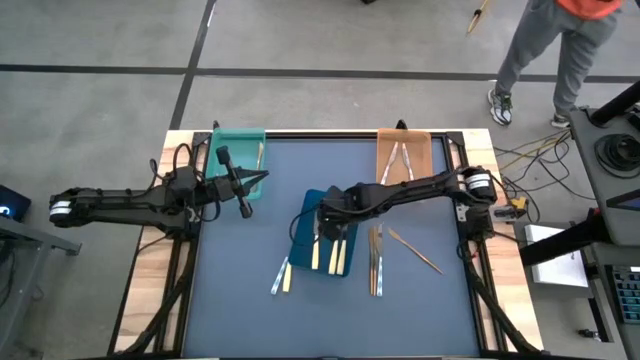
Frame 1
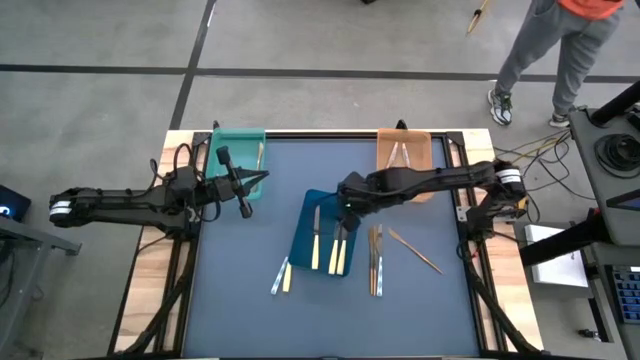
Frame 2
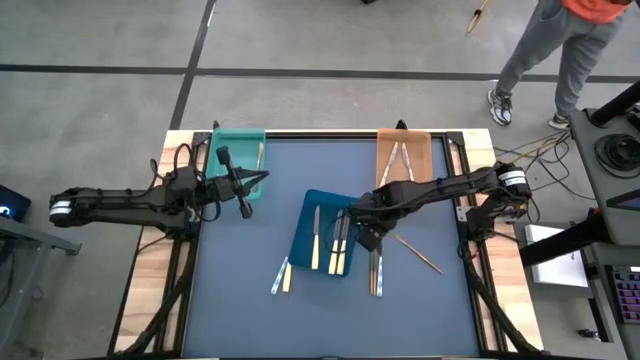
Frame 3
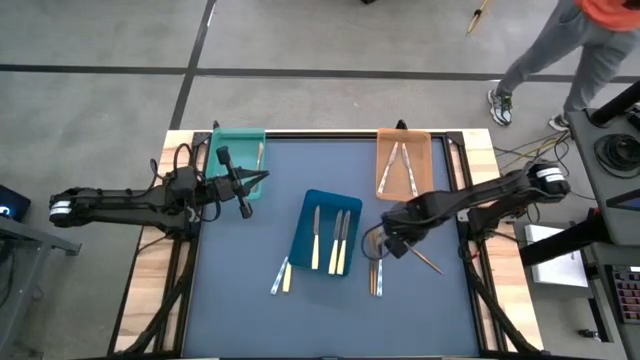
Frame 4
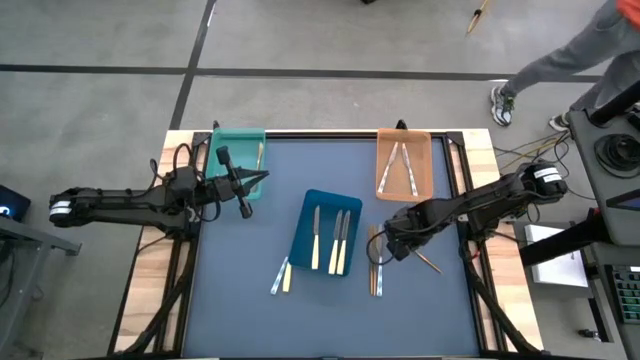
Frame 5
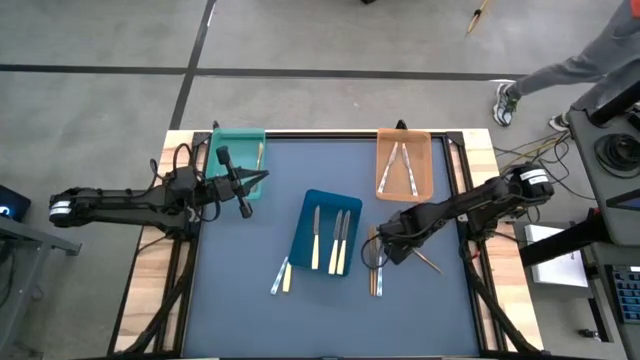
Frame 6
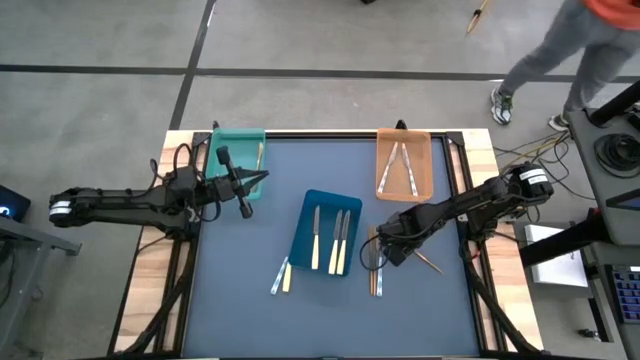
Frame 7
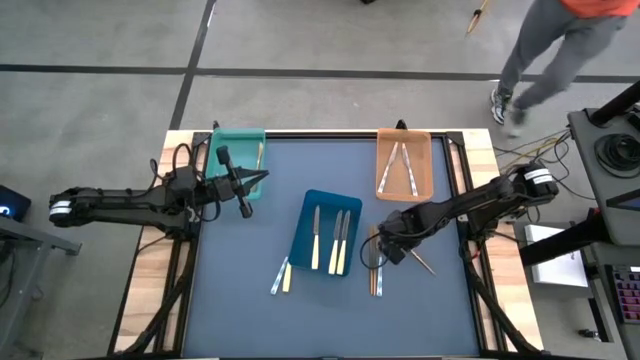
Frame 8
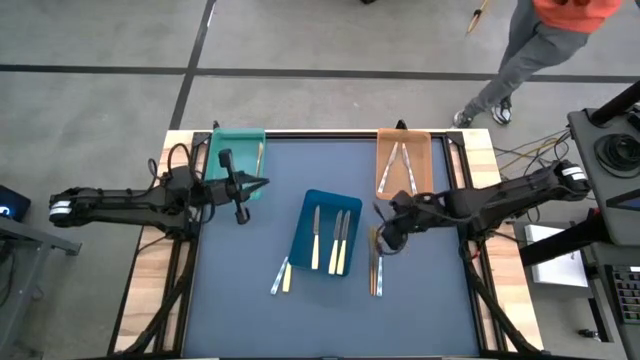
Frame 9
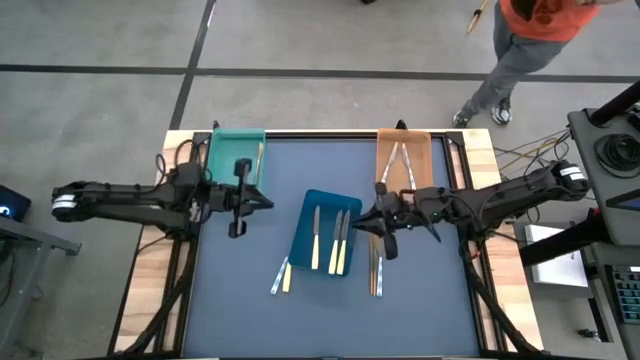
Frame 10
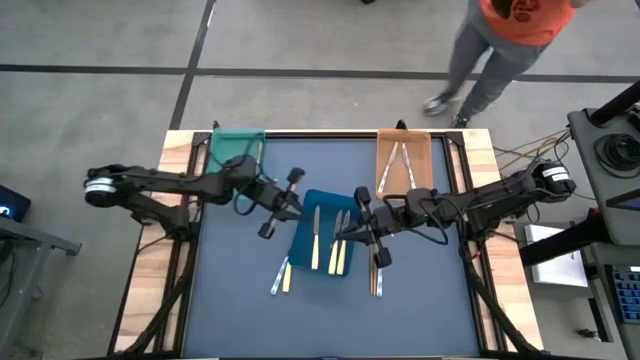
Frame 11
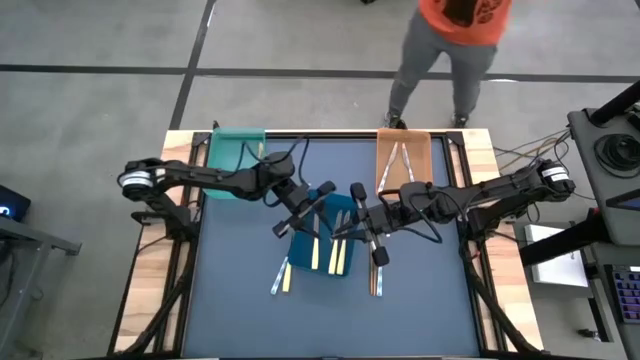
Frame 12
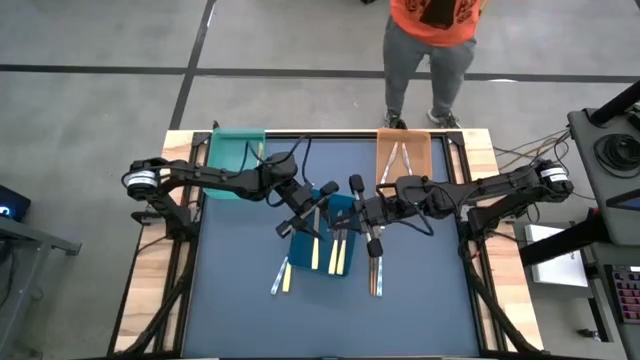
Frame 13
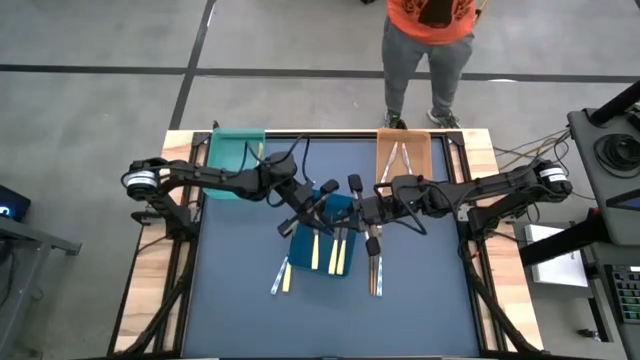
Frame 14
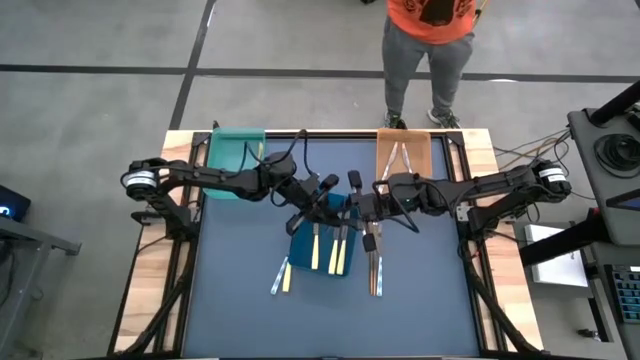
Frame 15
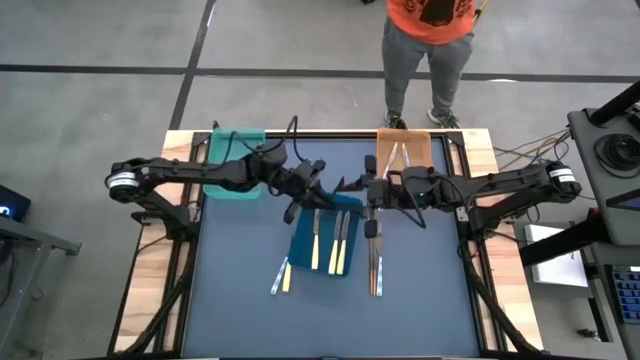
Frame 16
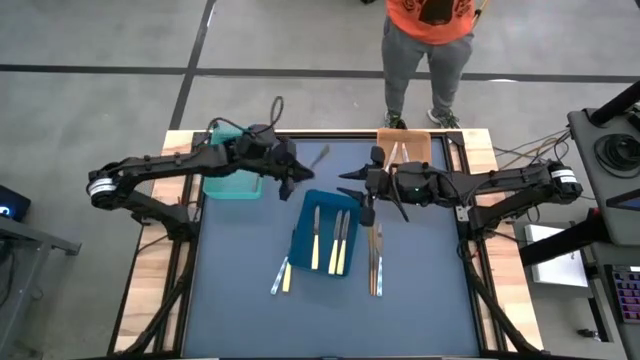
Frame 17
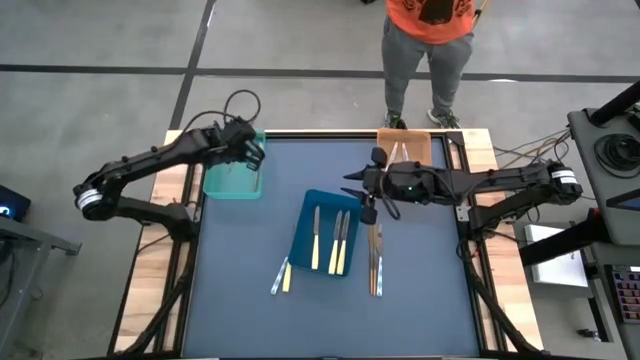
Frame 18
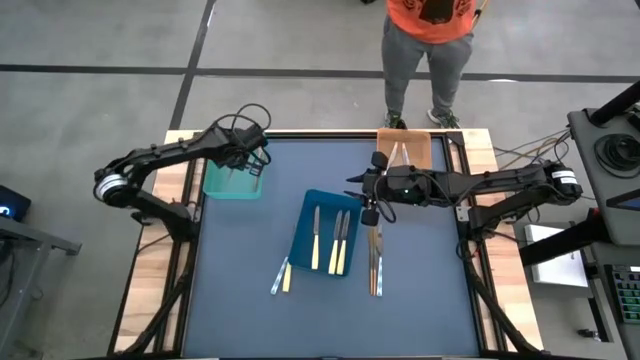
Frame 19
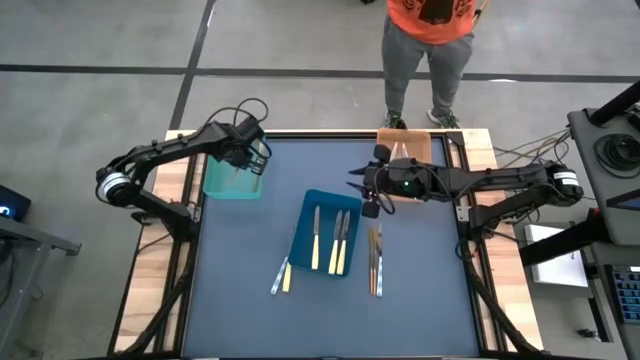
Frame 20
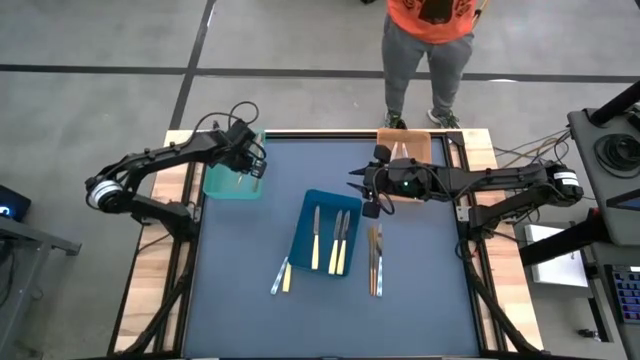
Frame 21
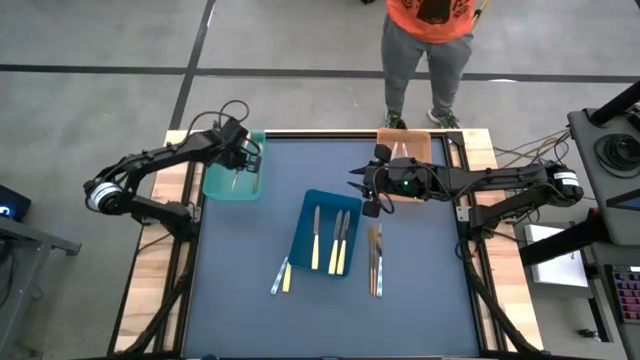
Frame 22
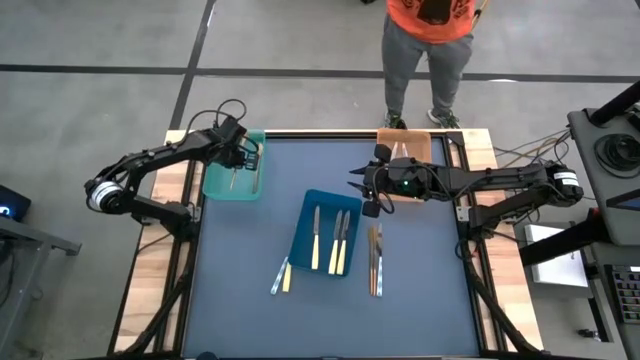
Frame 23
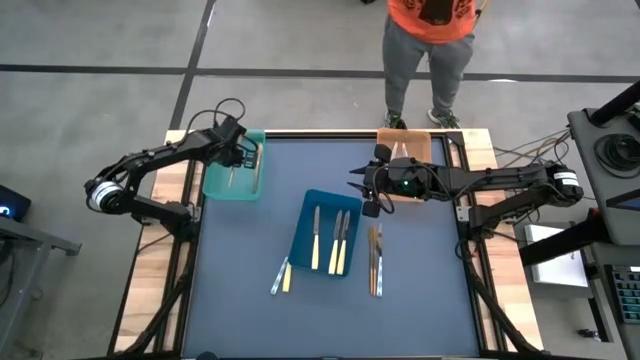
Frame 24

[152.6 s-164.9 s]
Task: Sort silverware by color (type)
Put the top right gold knife into the light blue bin

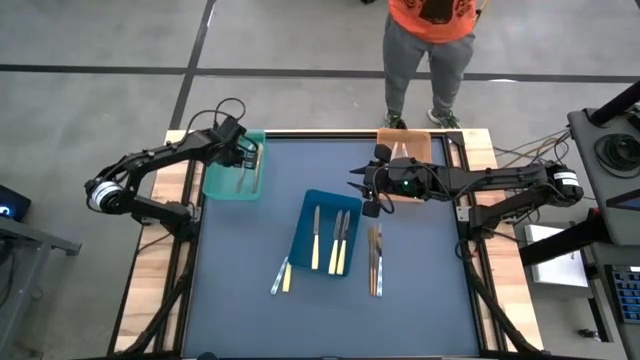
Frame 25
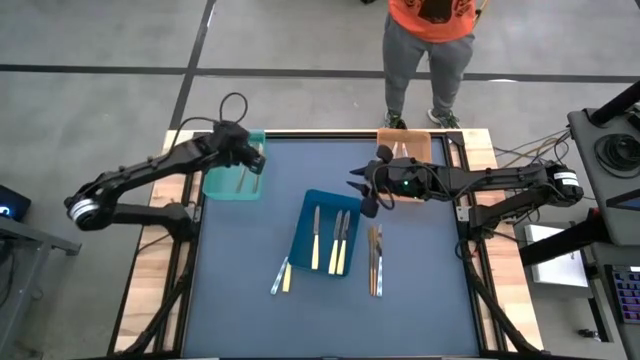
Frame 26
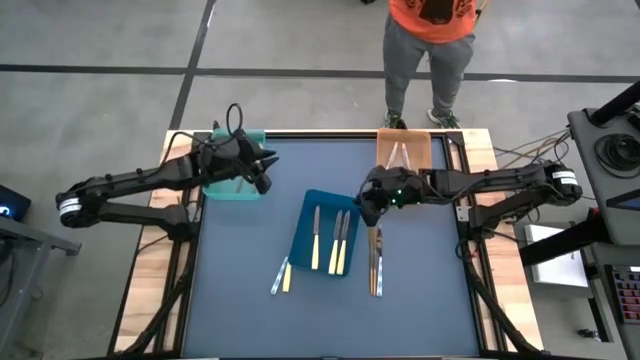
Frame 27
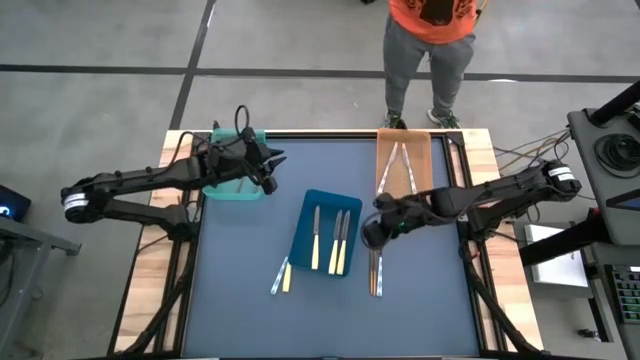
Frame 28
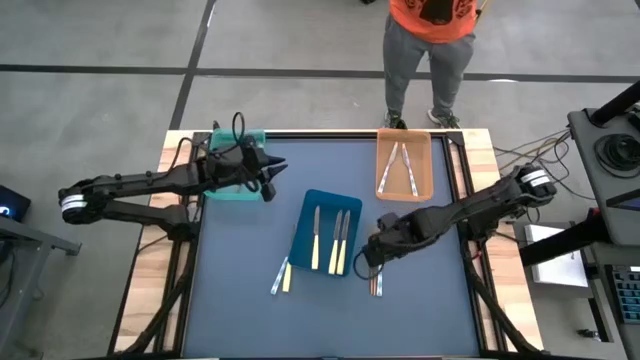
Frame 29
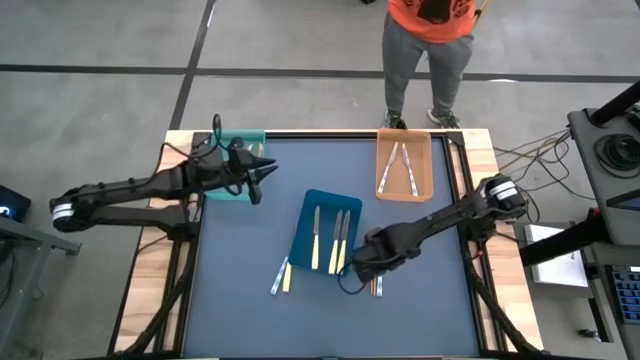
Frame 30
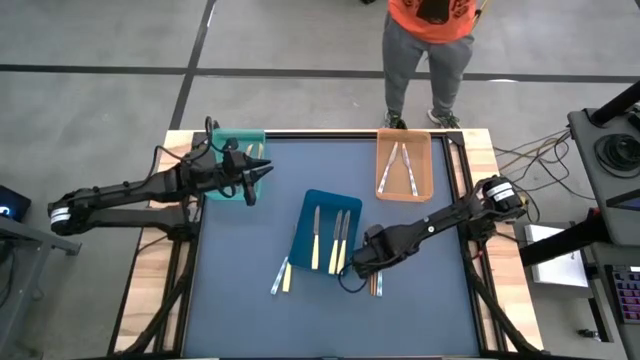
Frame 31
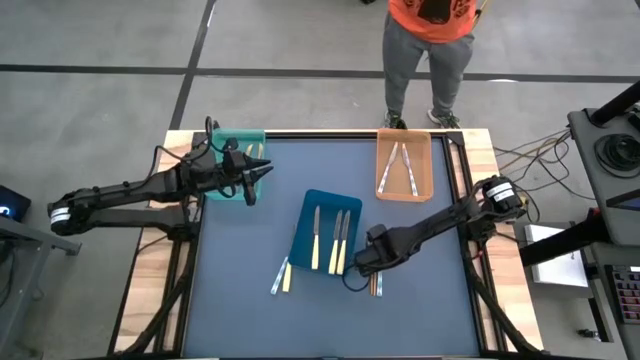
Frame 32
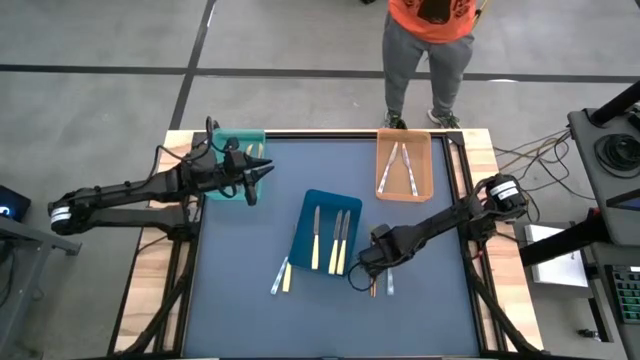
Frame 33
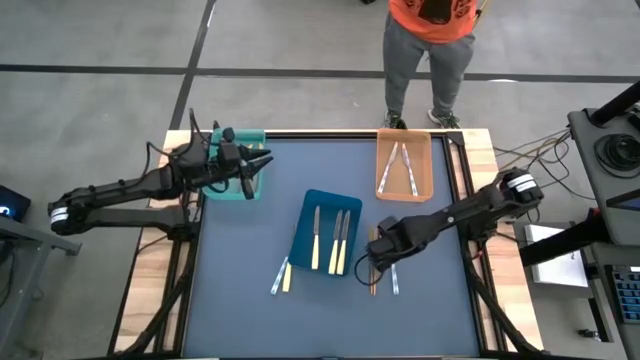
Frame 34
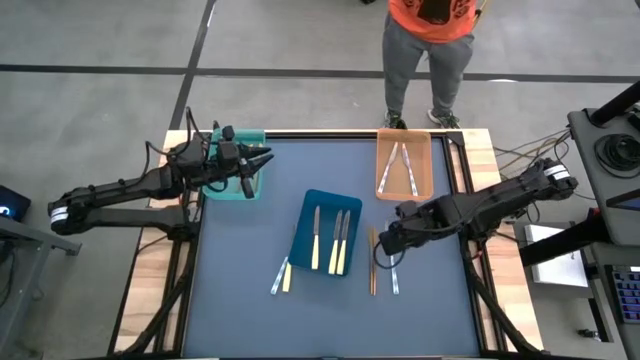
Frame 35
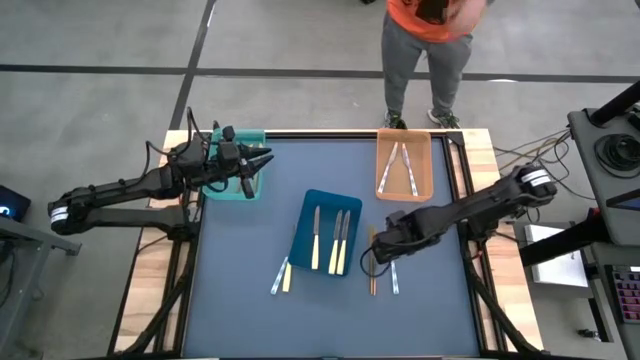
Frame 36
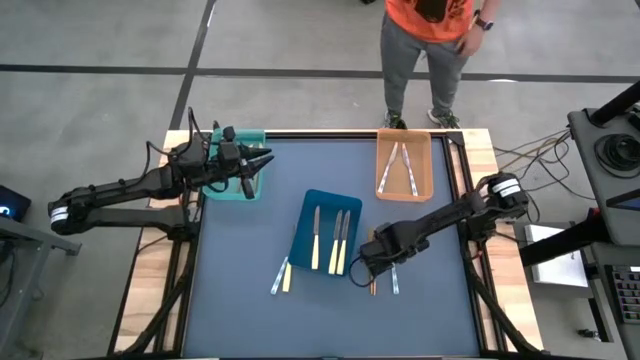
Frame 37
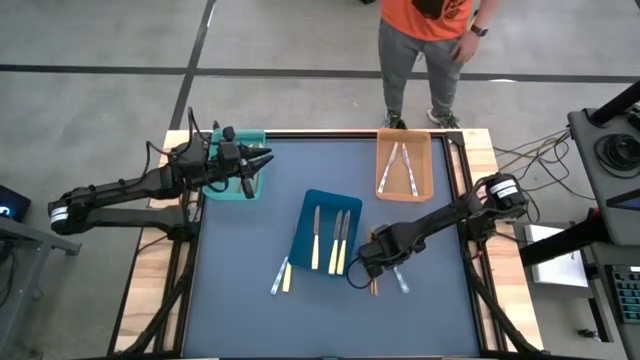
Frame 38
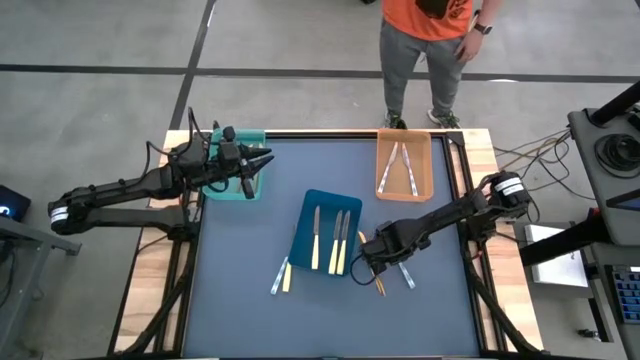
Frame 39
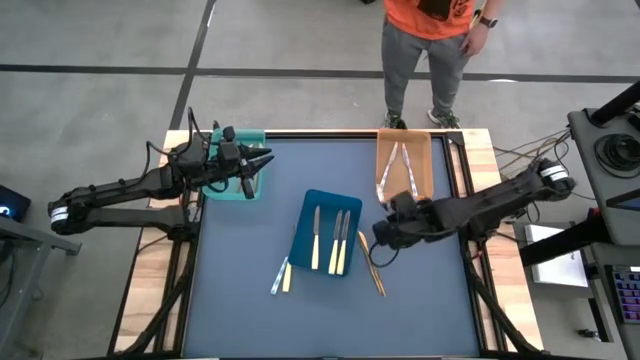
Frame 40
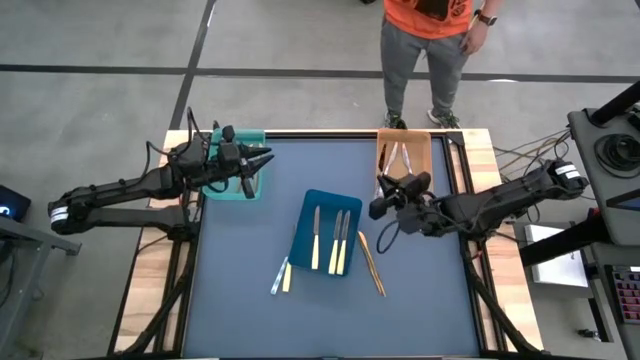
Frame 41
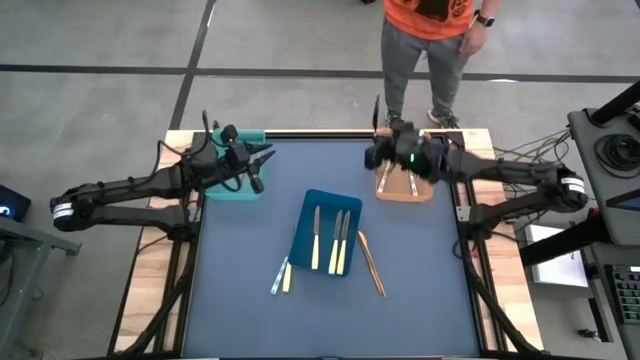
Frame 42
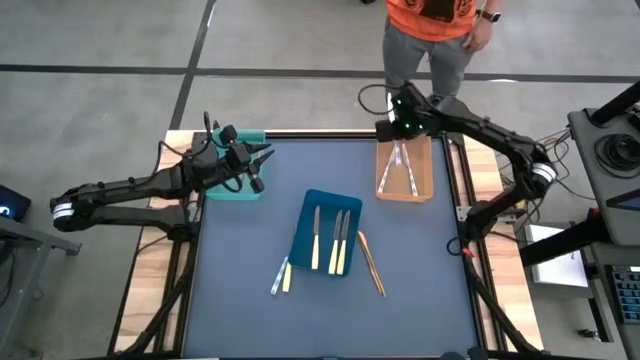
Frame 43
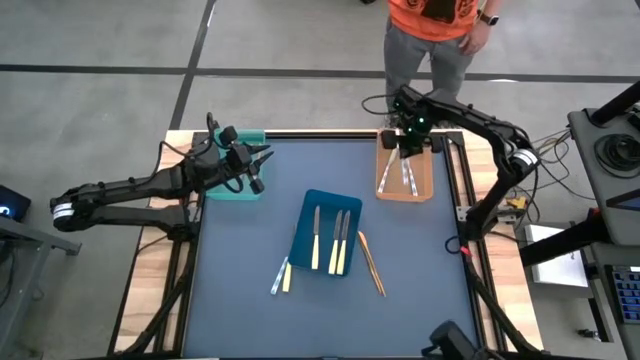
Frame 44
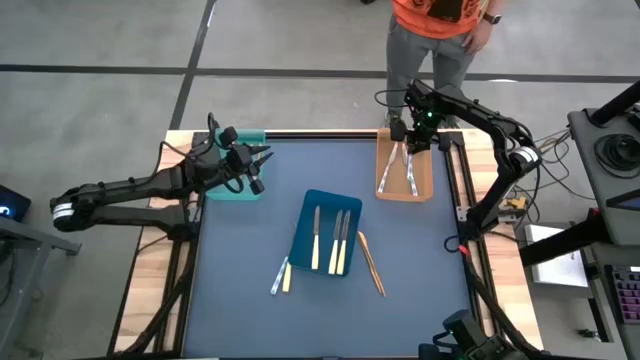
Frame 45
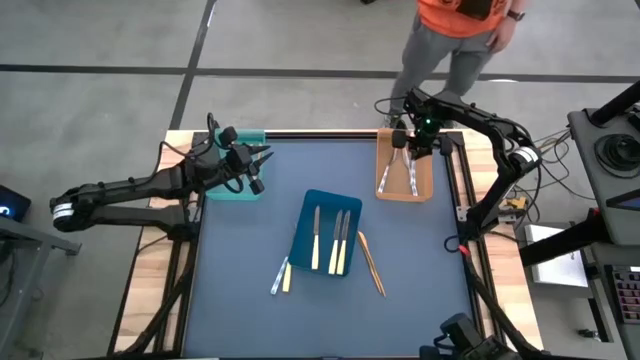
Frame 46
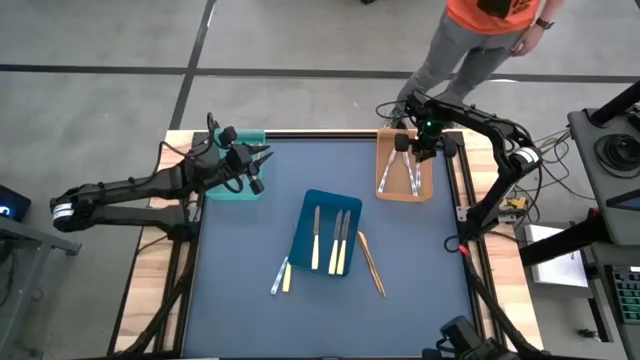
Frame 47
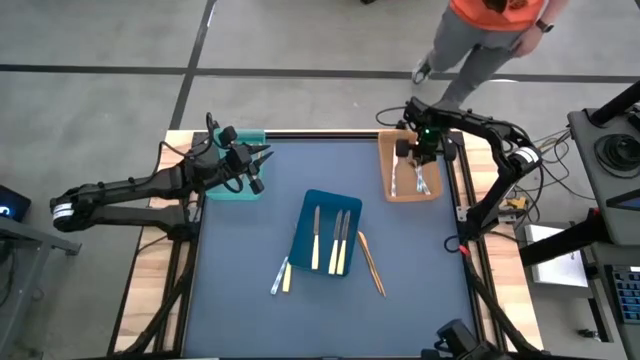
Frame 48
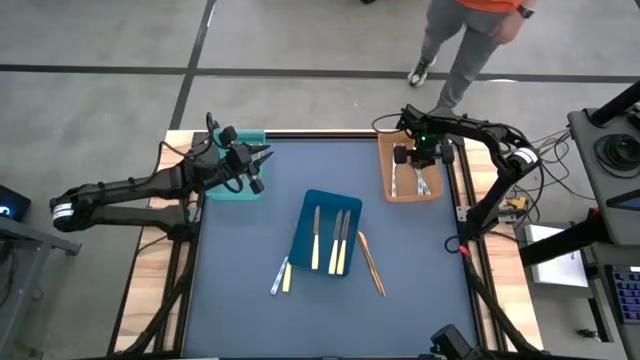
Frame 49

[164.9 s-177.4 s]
Put the right blue and white knife into the orange bin
